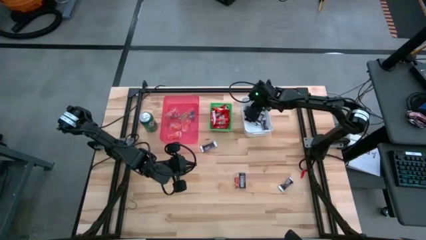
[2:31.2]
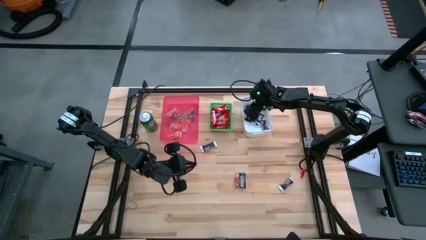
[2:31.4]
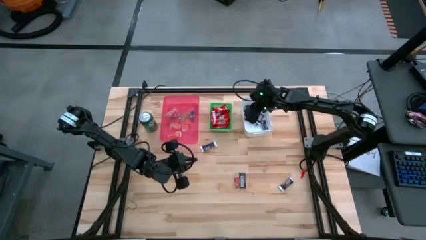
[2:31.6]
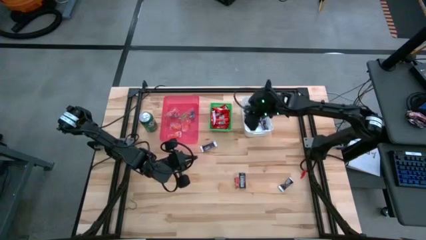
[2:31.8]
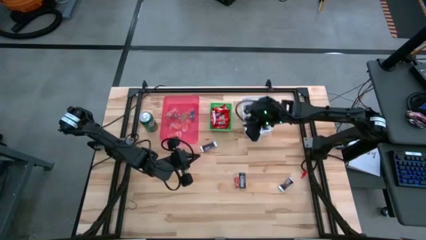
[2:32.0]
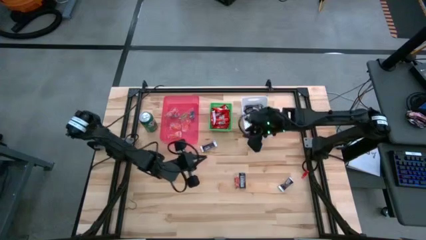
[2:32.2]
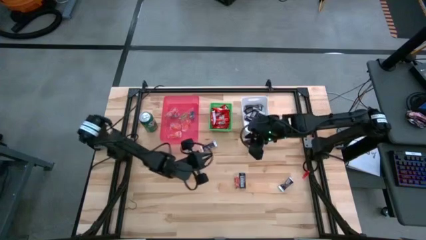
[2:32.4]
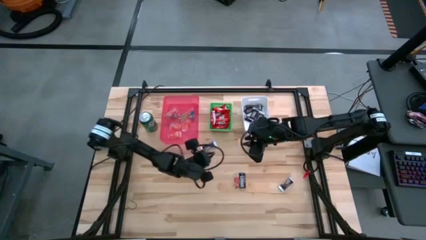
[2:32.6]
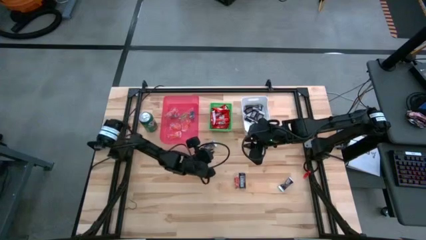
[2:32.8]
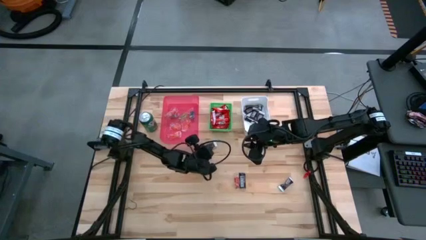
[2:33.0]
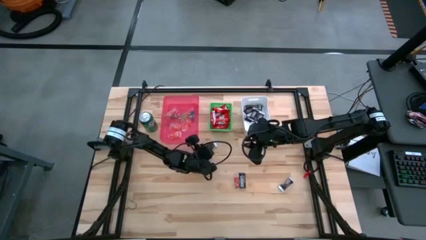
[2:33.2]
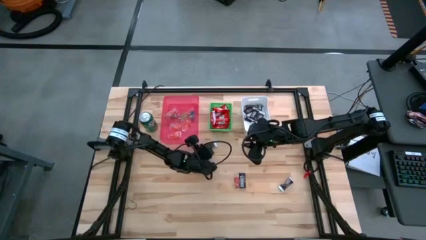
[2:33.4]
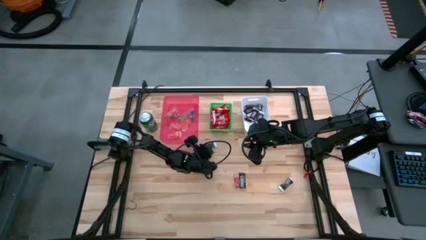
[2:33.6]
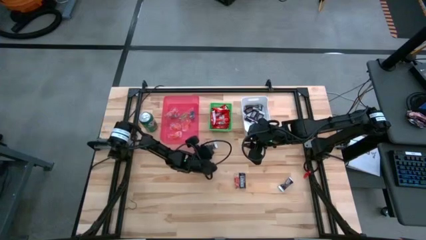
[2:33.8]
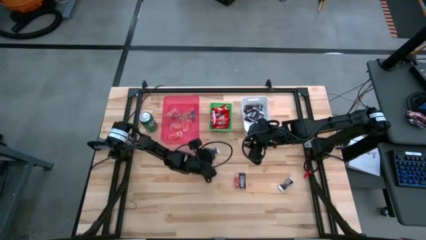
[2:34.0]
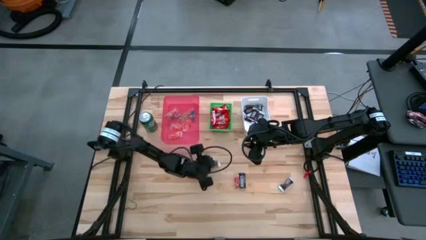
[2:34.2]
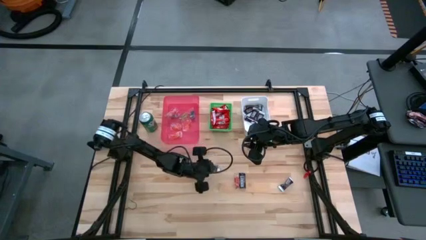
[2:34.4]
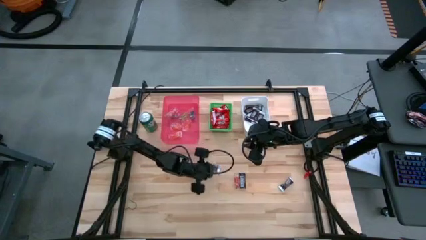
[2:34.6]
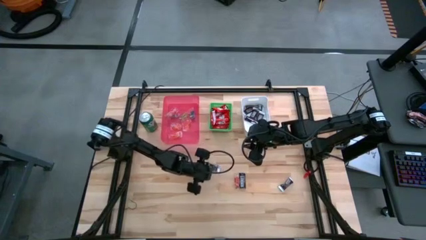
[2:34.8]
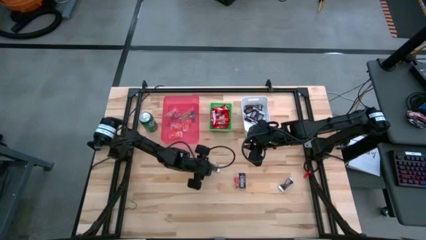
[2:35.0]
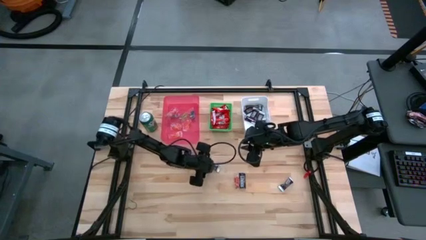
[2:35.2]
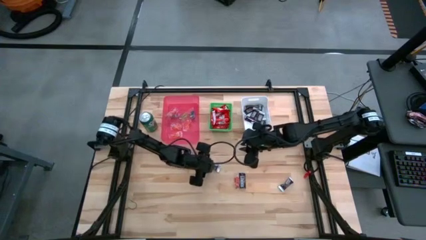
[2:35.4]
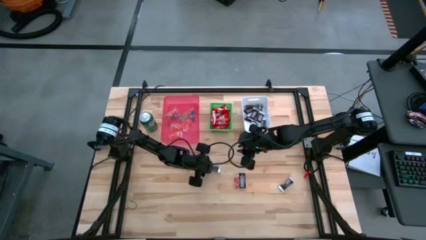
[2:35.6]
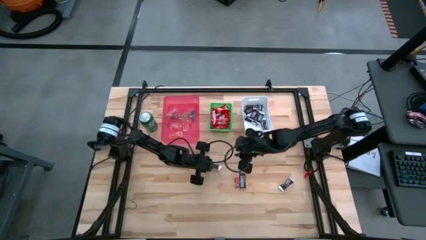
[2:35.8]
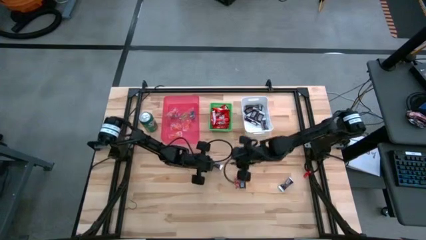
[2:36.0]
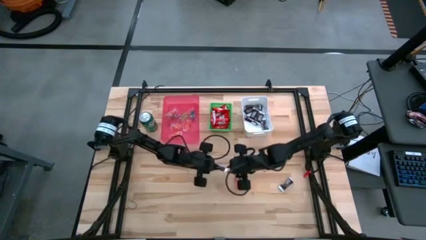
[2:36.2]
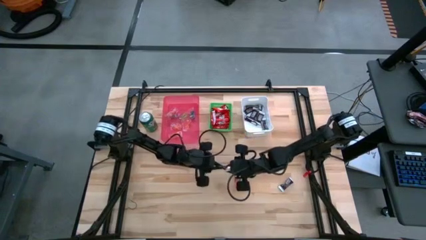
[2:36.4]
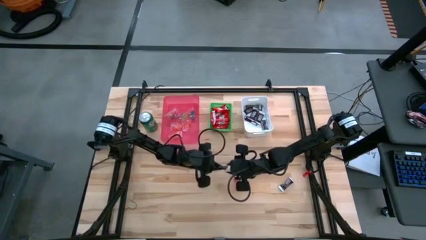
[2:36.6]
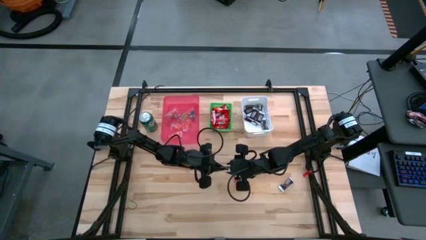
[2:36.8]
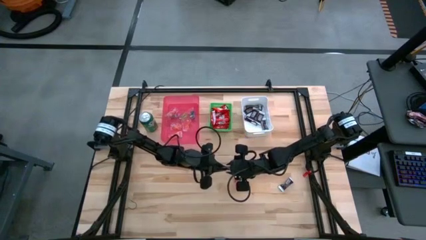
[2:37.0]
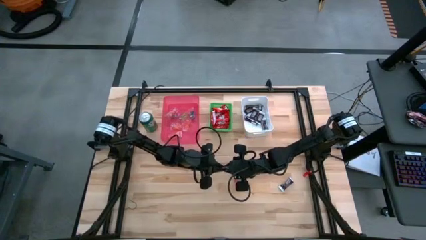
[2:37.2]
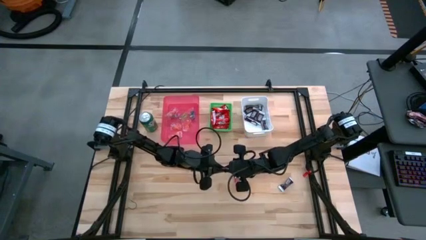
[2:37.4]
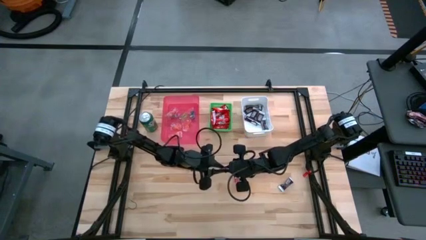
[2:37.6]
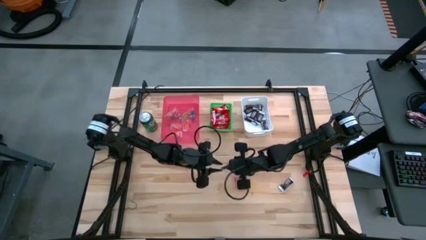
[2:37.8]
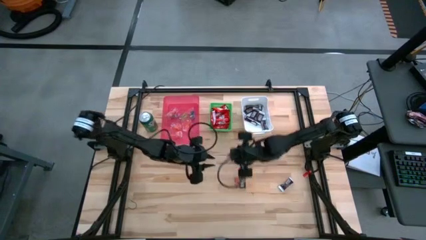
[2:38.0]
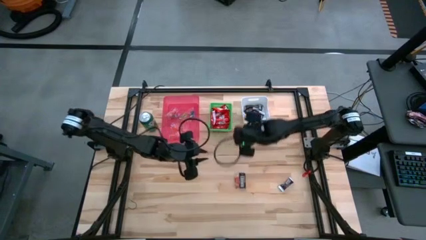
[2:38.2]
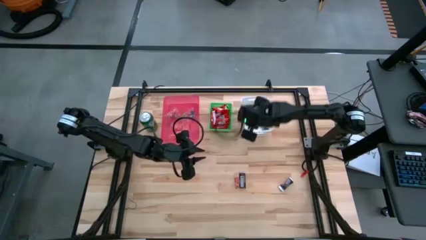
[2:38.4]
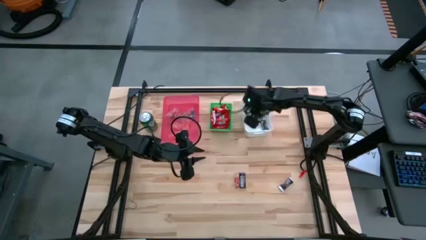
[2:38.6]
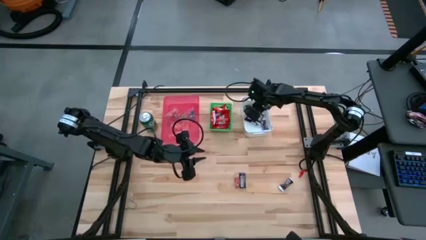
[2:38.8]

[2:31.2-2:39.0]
Task: Sort candy
Put the brown chocolate into the white bin

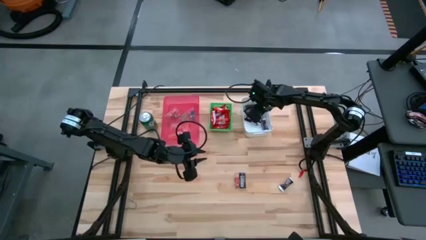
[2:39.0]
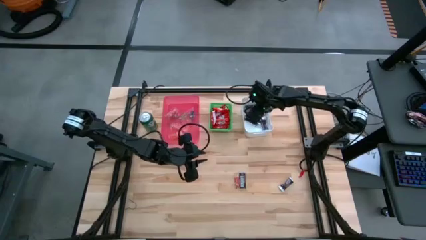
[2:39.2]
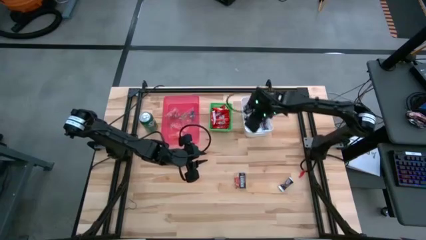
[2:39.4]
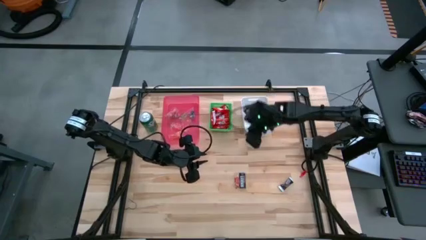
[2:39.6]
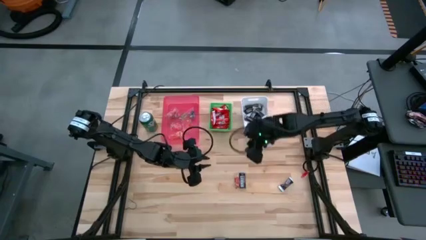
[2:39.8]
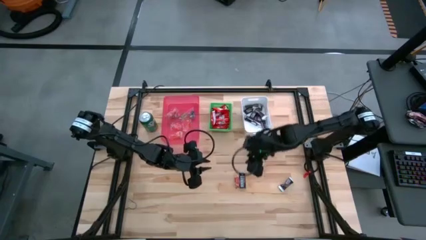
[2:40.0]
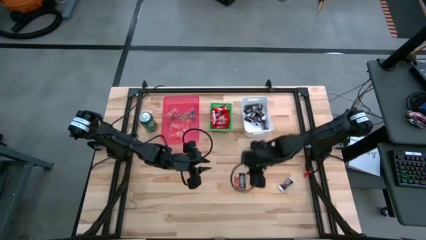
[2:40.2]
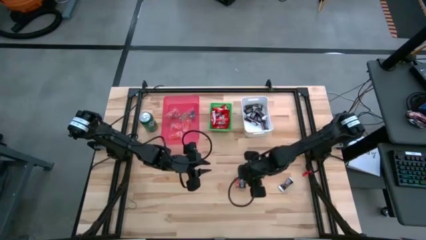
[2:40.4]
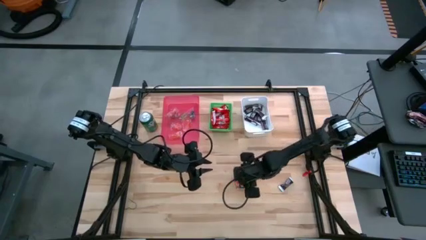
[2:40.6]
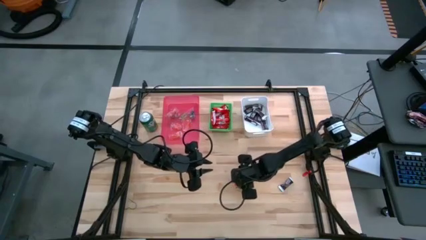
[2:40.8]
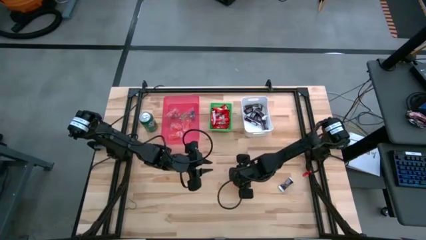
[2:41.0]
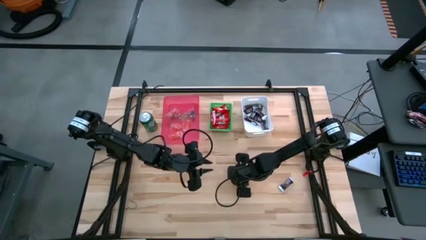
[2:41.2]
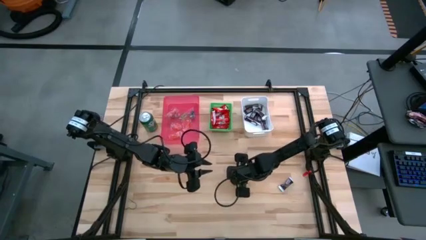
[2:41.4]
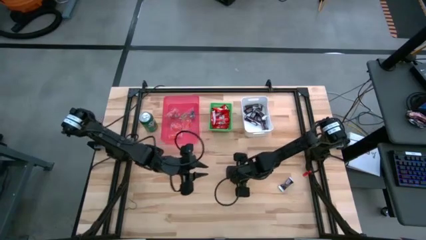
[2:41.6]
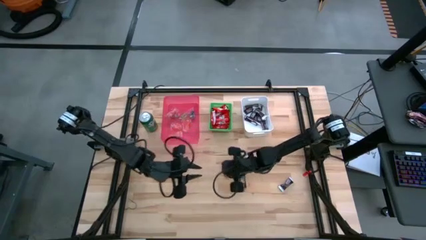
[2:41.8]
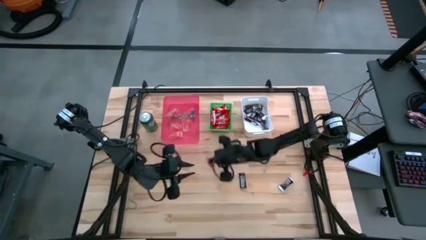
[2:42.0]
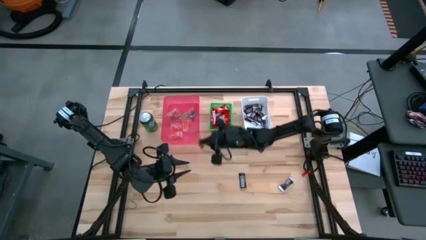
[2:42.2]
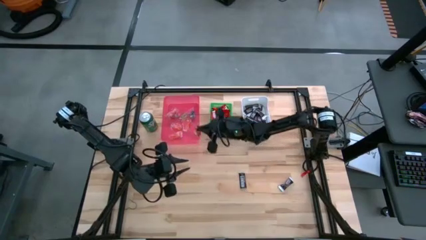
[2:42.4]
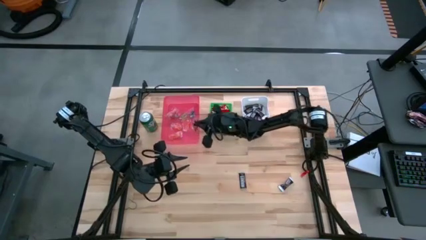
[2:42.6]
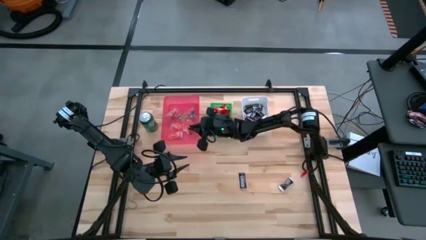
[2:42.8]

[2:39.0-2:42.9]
Put the red gummy into the red bin

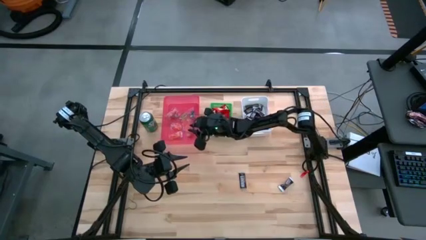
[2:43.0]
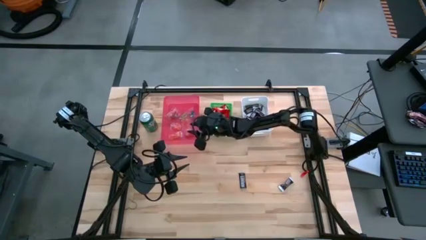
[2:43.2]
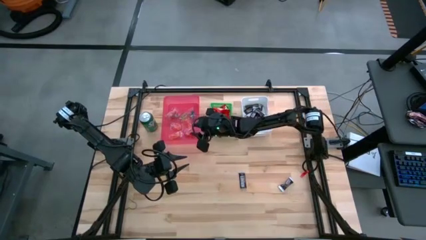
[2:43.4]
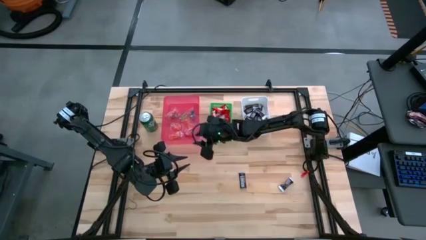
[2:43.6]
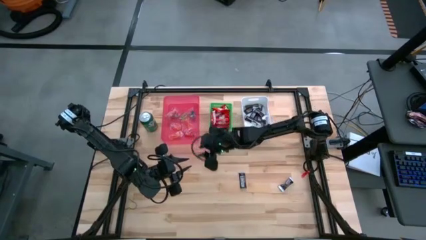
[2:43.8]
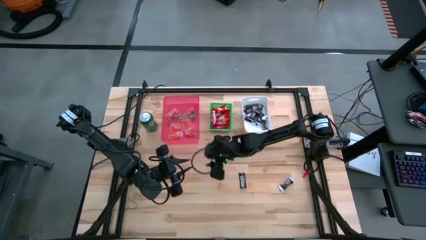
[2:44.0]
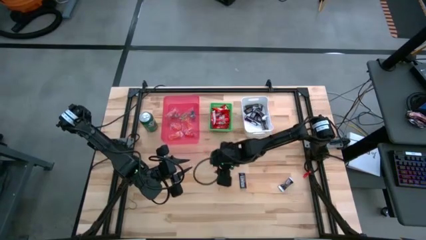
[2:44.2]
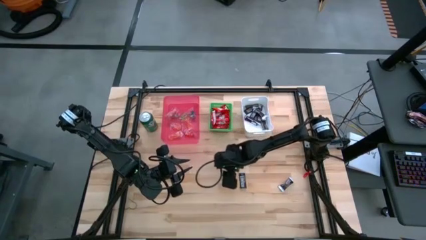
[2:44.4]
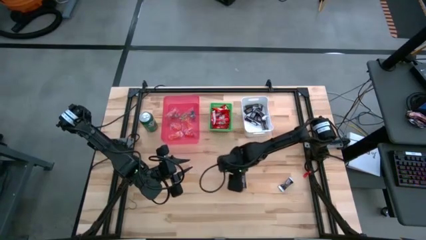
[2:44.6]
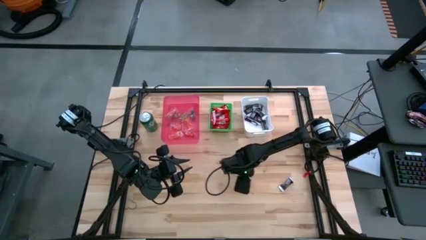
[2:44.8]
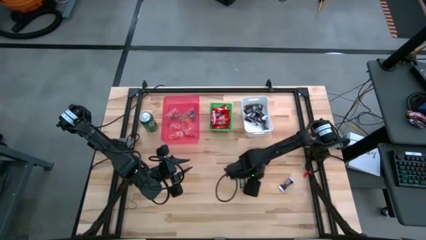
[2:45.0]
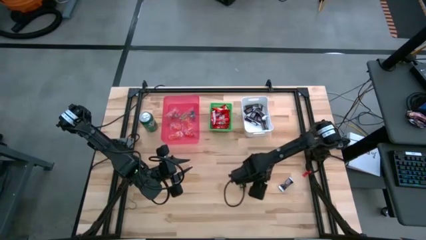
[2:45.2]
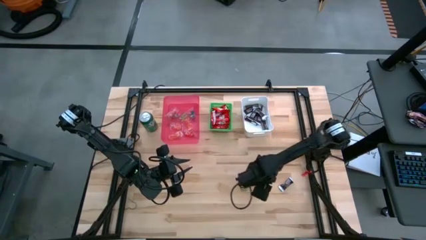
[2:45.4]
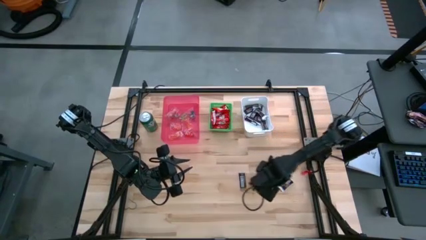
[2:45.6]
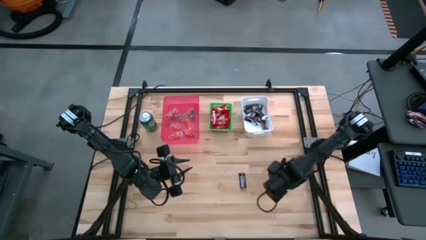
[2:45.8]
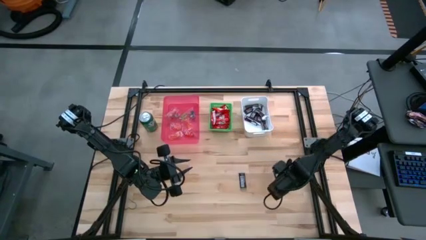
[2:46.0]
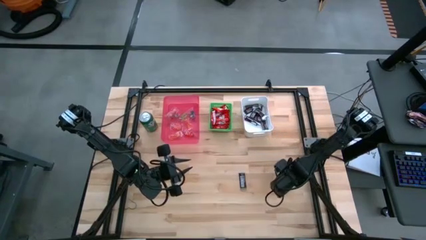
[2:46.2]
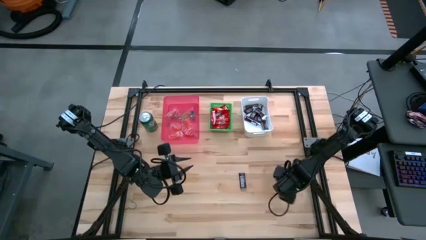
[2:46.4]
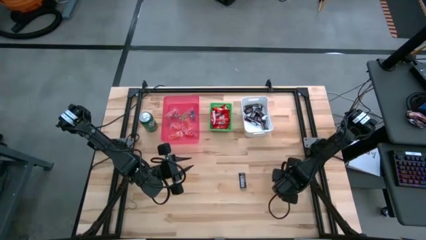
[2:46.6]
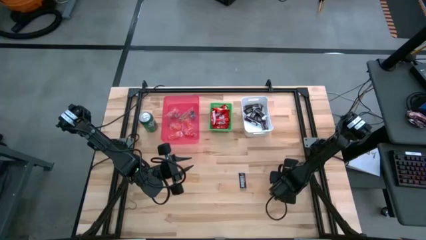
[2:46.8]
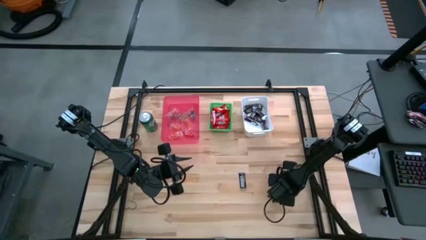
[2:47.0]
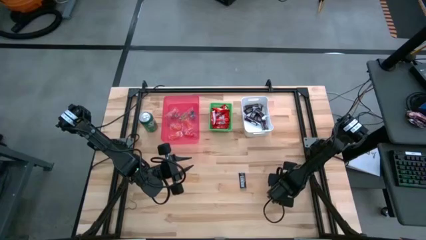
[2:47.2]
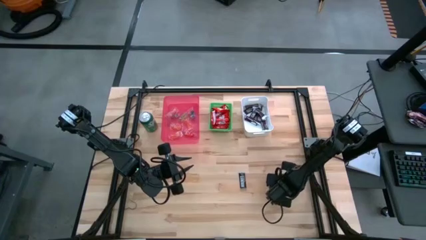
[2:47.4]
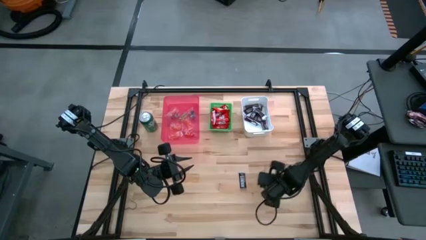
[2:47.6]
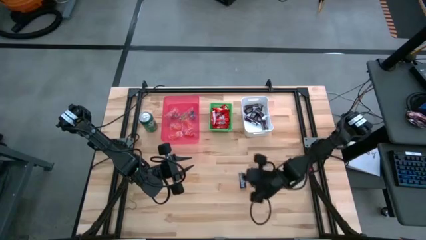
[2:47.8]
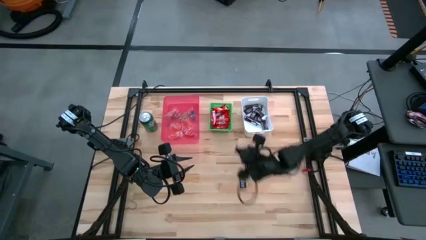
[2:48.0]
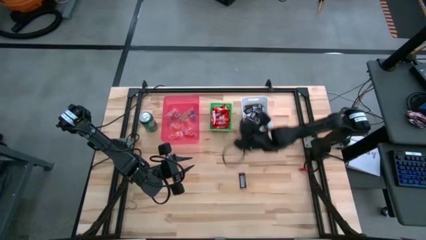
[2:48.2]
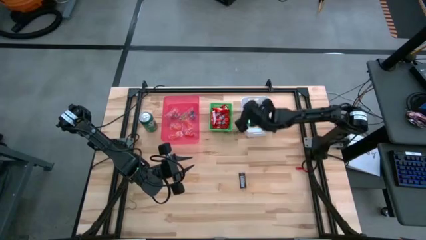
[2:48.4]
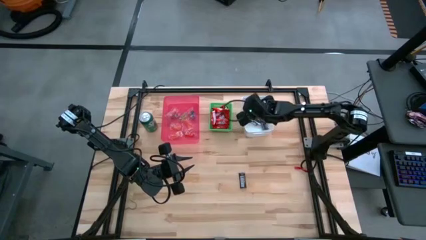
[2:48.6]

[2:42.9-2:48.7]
Put the brown chocolate into the white bin
